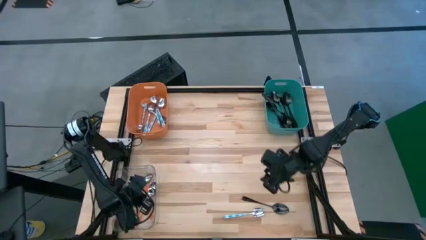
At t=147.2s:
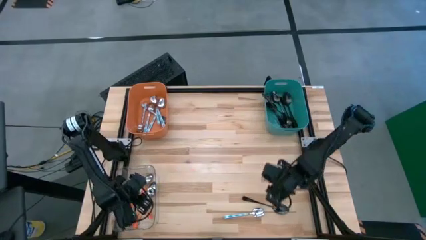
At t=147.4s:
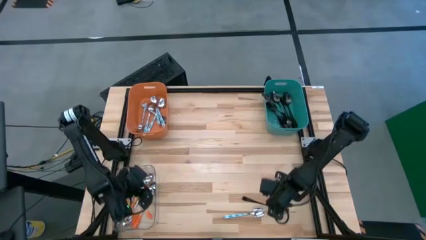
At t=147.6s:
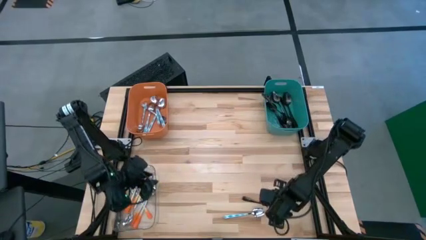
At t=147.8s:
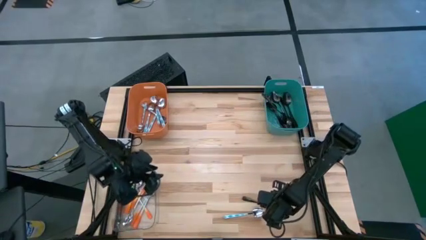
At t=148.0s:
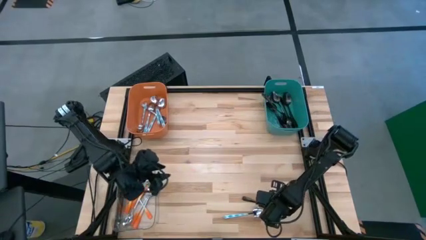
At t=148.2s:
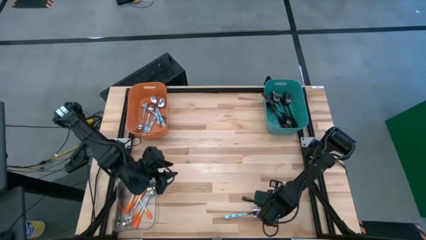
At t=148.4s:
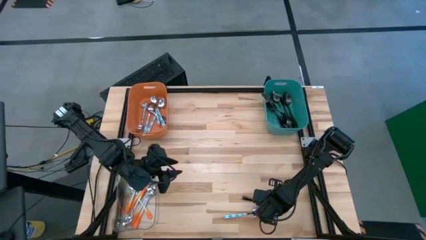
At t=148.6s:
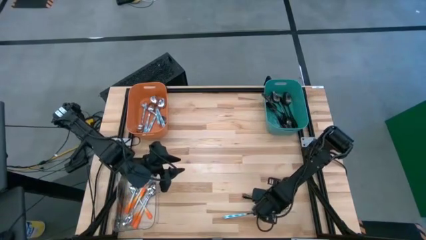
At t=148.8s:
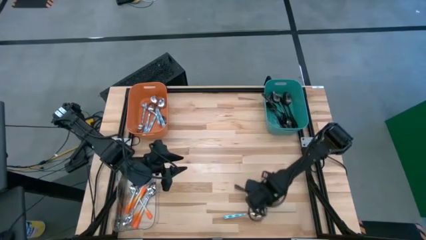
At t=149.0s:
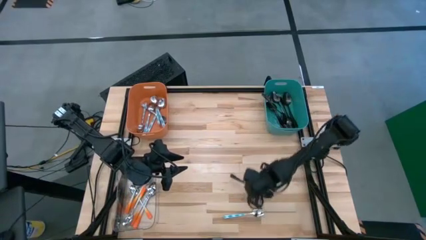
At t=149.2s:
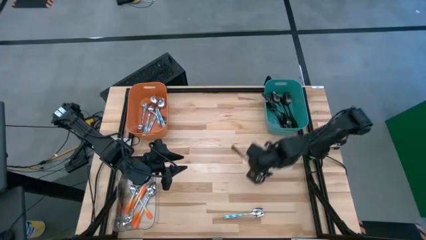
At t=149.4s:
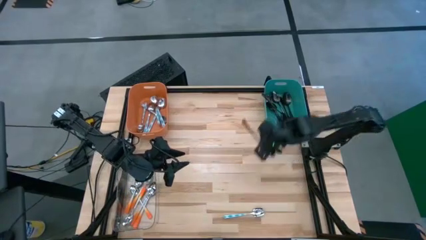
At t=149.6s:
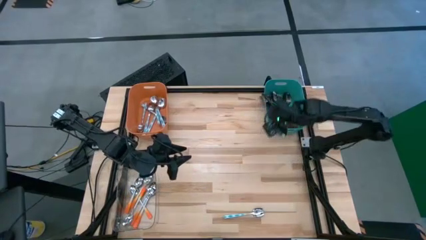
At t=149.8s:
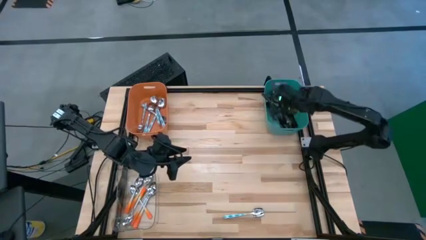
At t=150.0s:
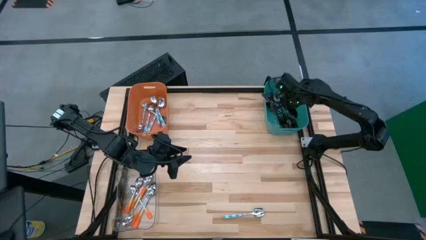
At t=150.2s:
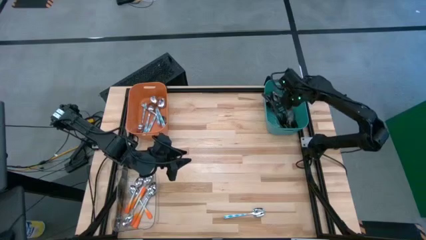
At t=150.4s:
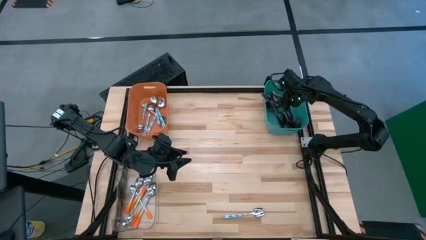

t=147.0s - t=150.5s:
Task: Sort silverware by color (type)
Put the black spoon into the green bin

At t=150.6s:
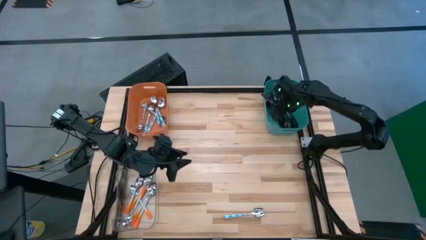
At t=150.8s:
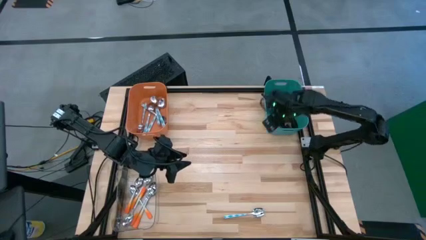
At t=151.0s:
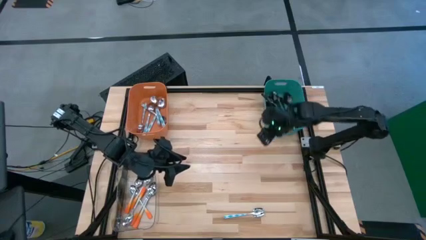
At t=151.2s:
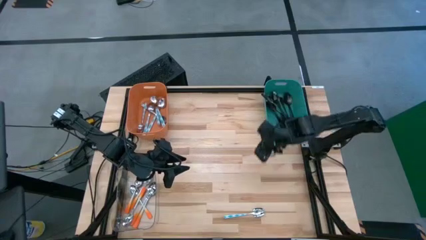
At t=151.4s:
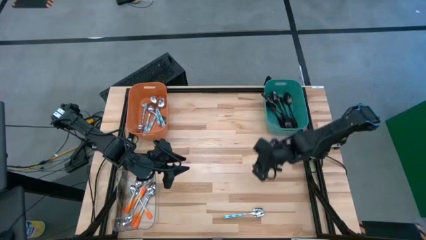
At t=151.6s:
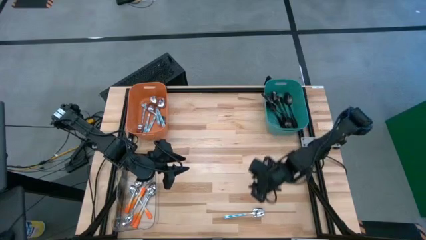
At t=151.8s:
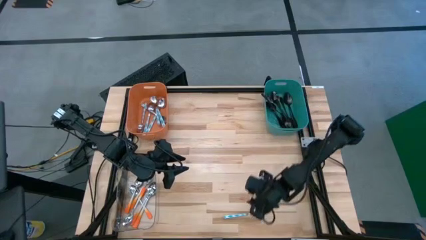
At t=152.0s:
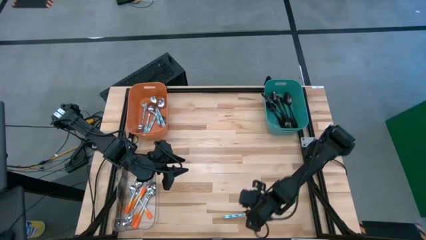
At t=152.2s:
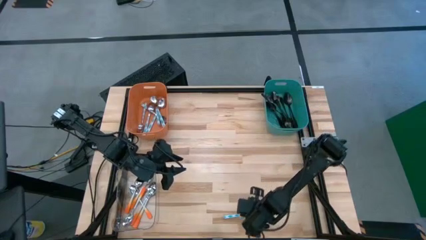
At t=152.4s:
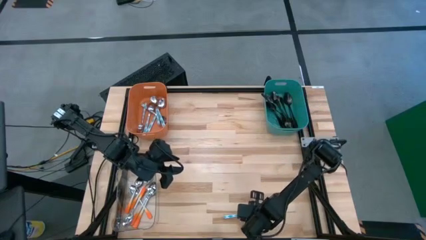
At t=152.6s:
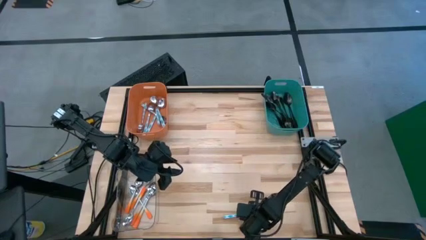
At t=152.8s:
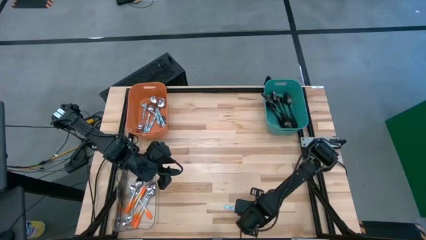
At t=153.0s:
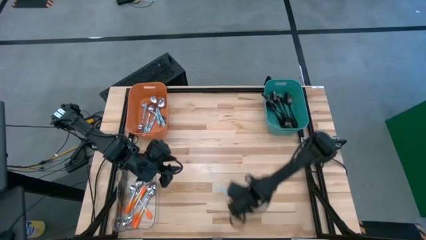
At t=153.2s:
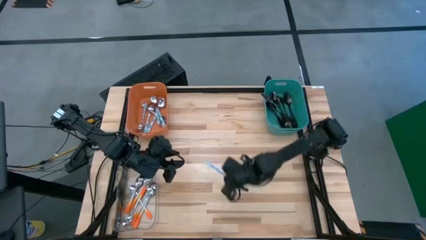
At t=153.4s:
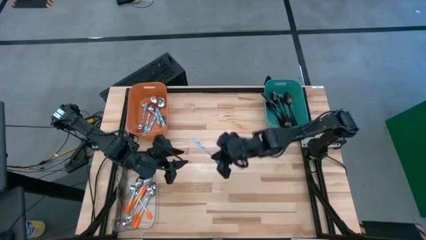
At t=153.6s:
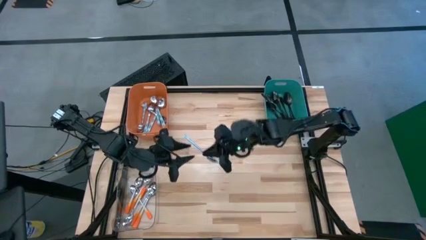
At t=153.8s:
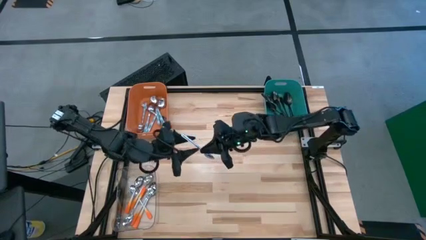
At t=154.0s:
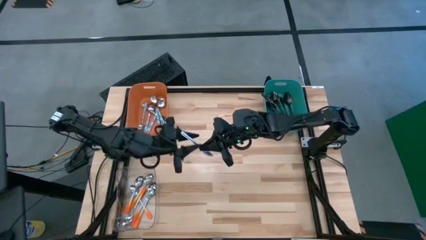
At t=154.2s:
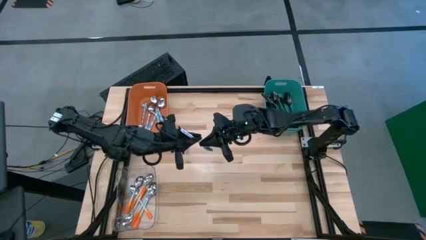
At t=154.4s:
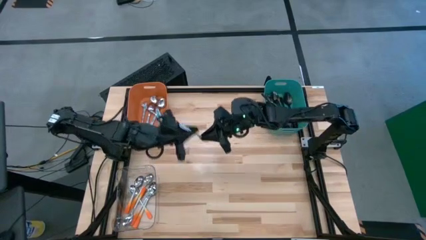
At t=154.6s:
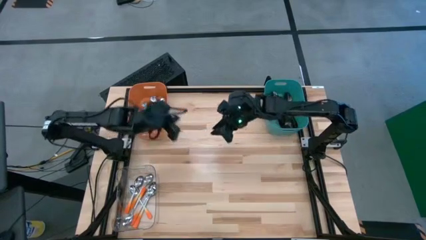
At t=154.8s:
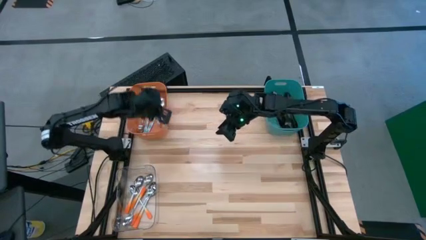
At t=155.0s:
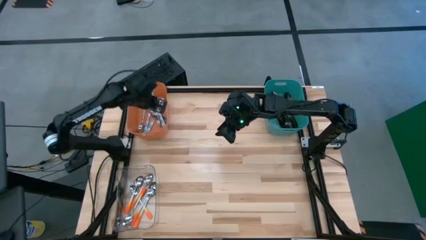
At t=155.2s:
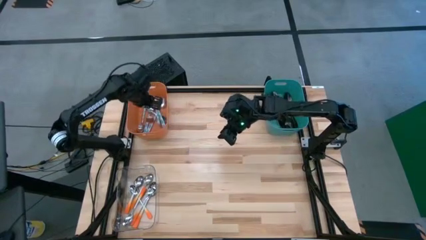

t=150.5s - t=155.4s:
Put the white blue spoon into the orange bin

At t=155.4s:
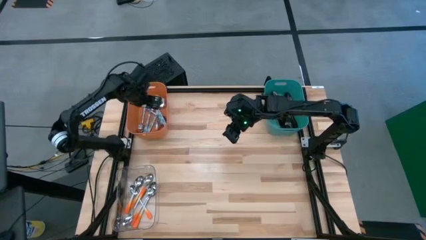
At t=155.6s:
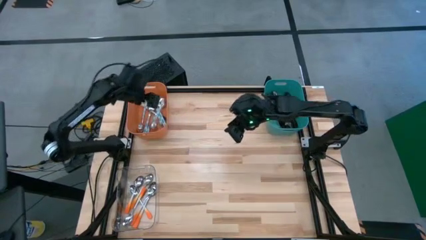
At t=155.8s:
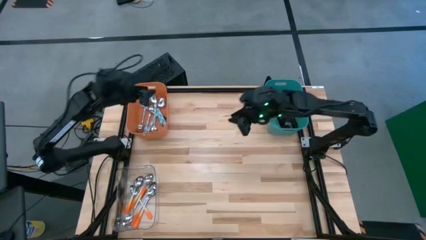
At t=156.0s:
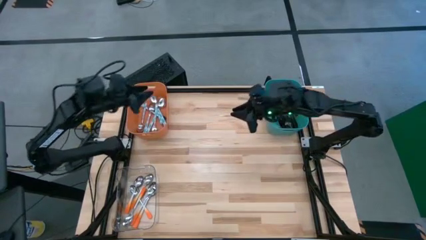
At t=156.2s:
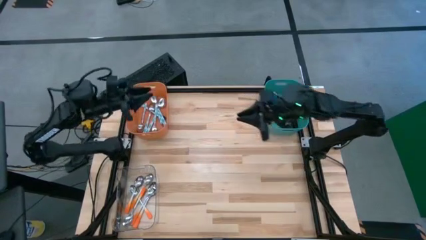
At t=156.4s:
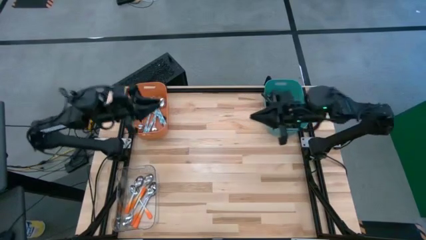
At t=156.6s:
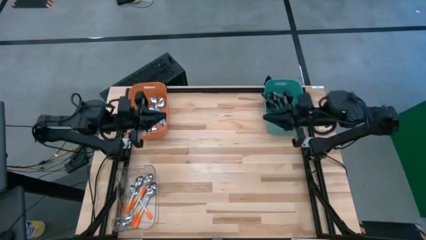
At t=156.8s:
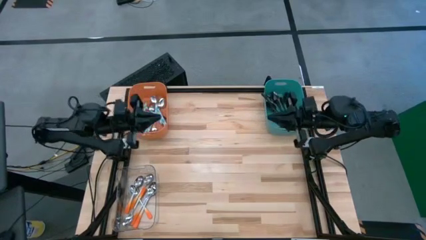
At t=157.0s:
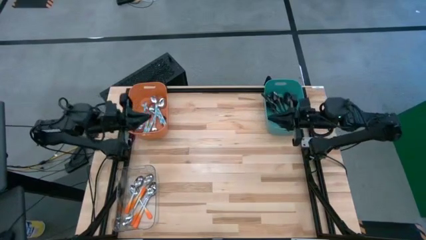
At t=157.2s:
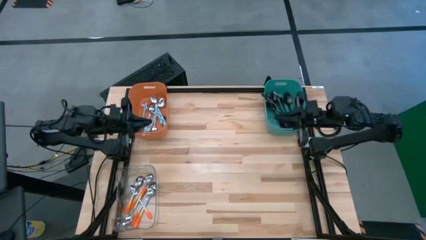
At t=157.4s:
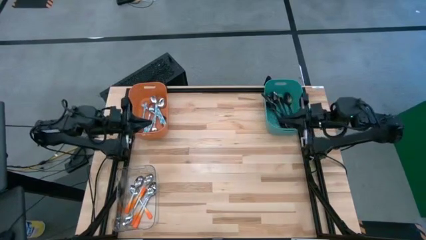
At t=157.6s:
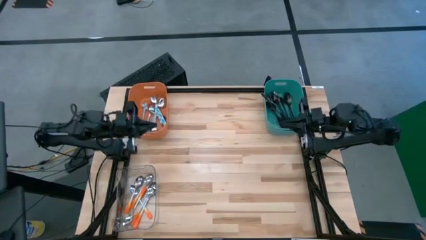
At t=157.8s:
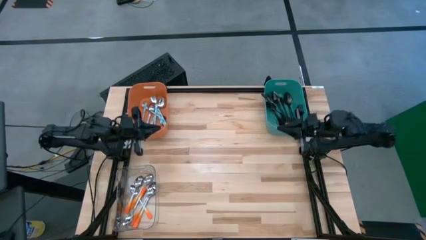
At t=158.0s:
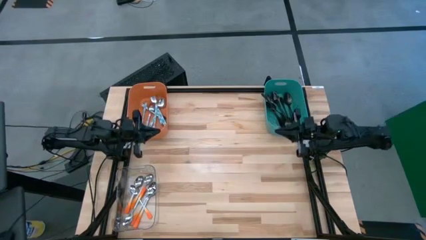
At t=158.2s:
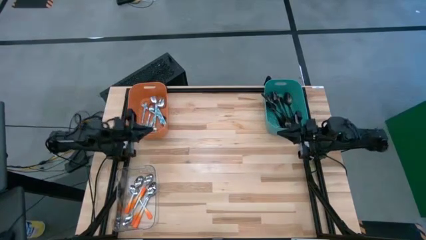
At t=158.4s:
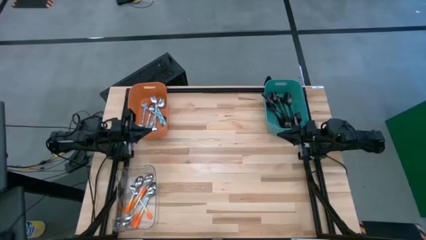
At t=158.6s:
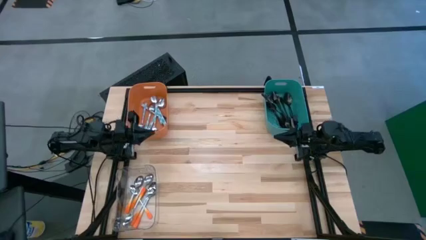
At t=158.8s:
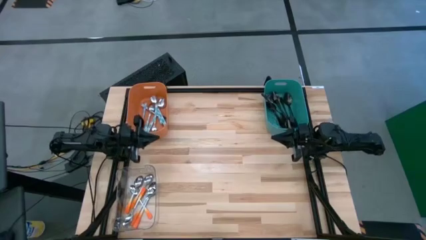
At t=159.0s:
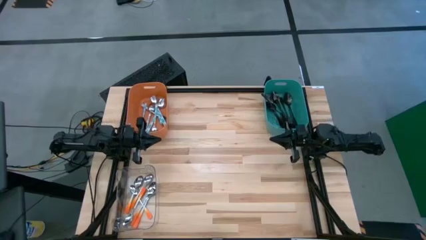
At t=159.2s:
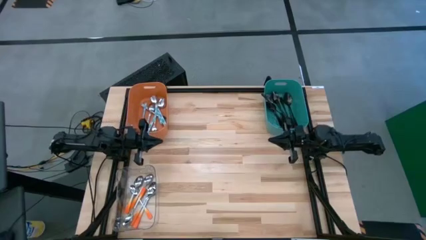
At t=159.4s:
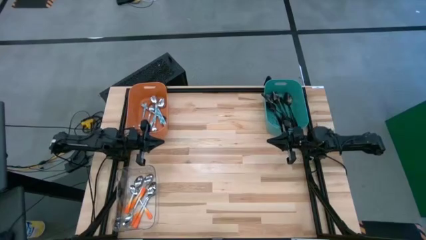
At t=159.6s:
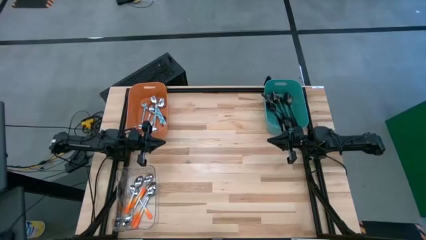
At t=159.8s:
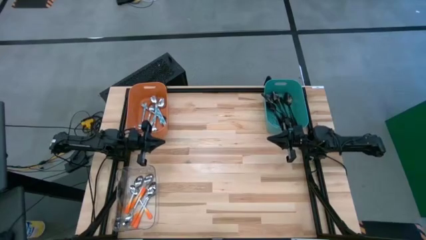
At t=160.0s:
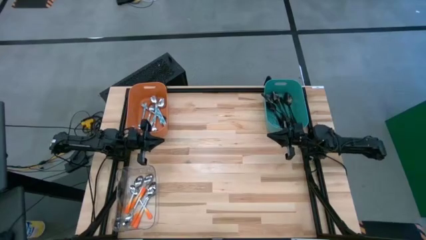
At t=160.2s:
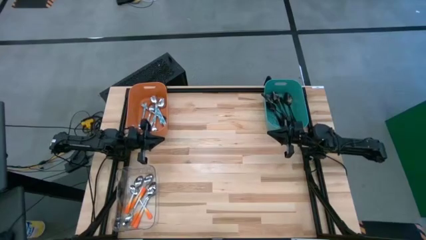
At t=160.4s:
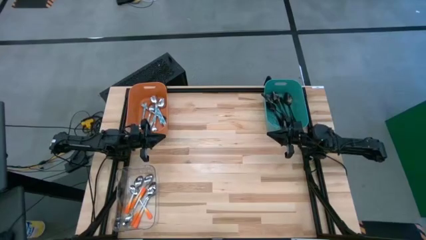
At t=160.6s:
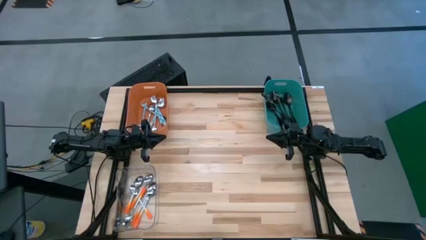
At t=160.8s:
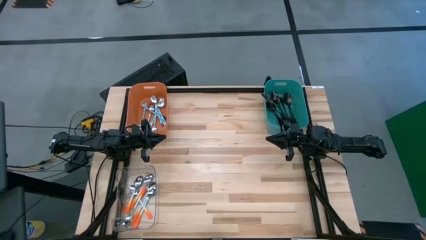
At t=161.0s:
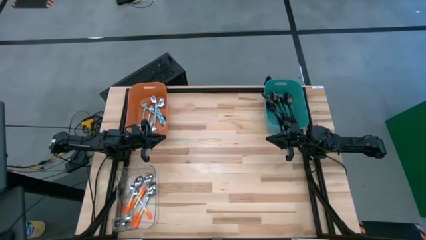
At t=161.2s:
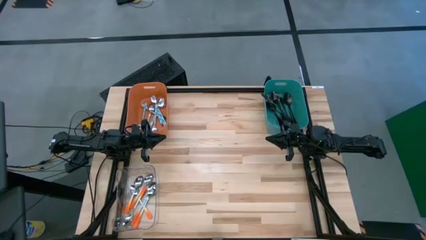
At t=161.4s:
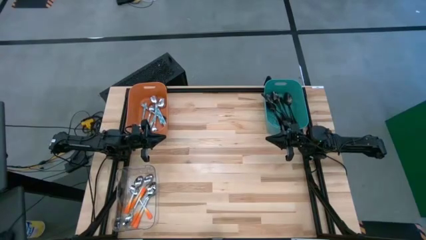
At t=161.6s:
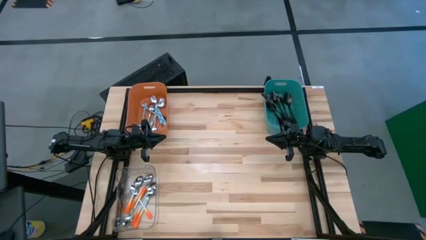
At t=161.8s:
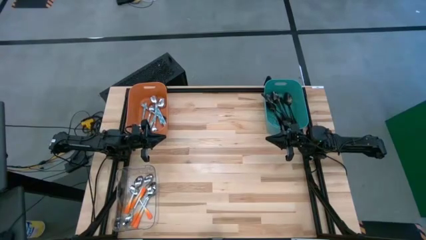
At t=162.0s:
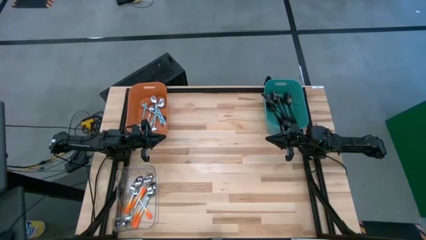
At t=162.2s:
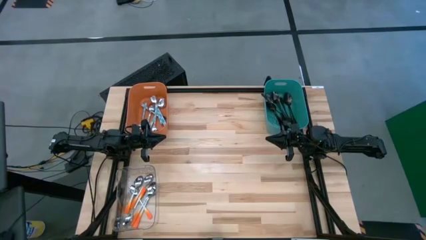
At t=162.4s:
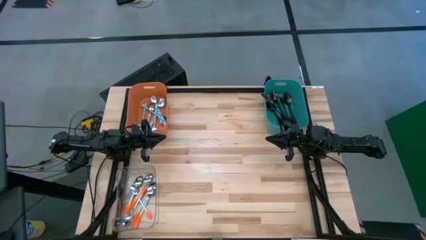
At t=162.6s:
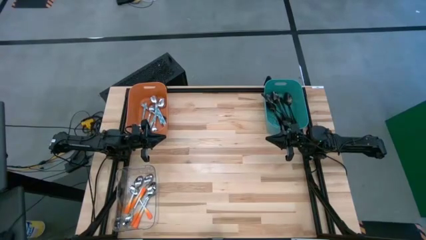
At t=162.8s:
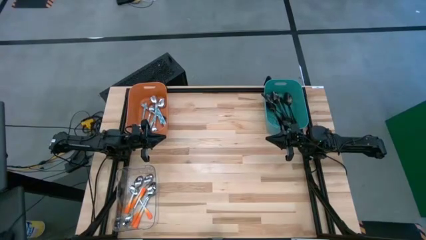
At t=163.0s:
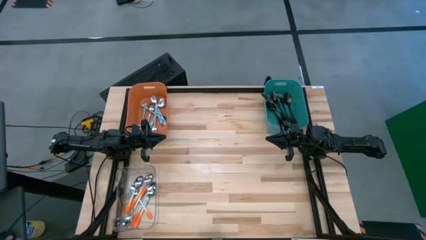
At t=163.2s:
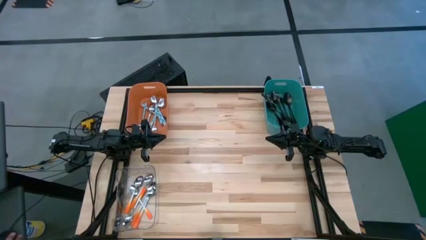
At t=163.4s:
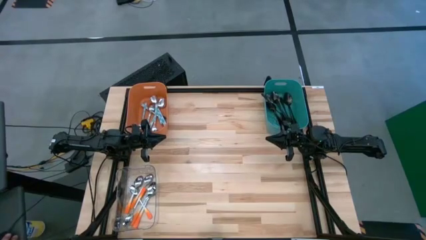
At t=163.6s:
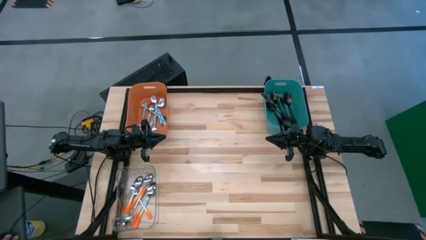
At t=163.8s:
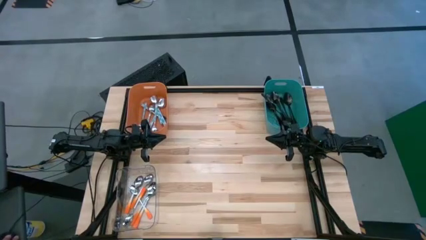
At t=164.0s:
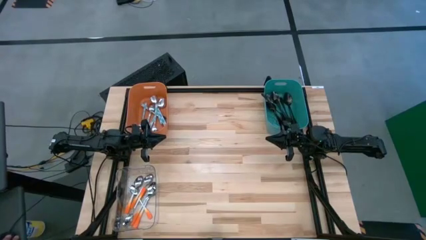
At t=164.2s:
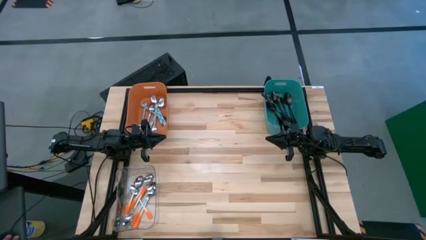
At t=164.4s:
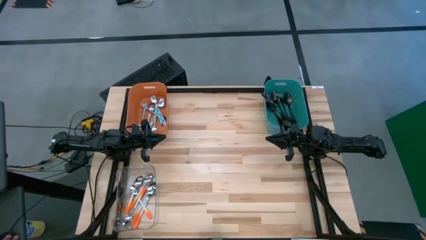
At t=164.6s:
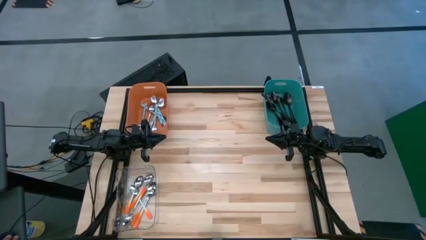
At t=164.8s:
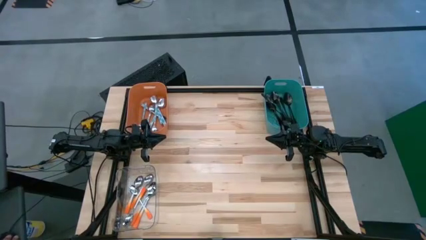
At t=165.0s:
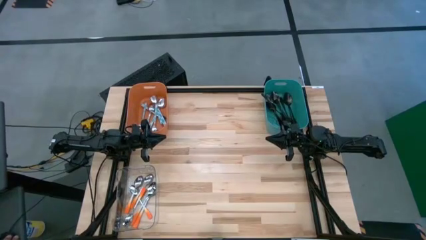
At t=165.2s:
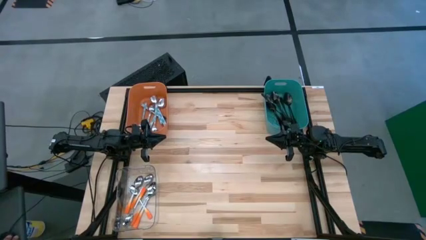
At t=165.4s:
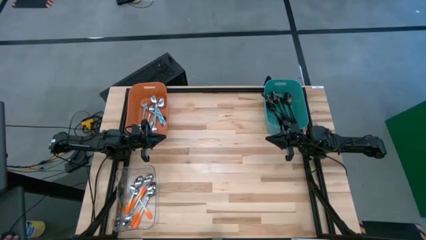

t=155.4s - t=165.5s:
Return to Home Position
